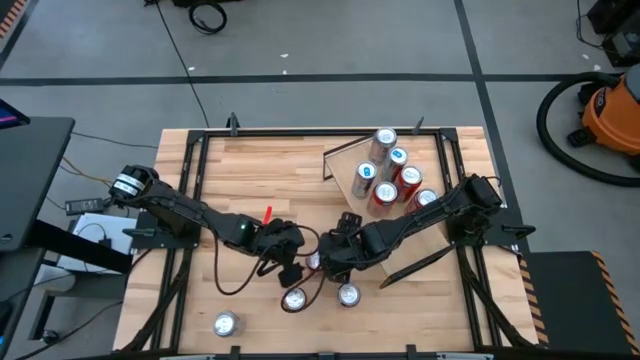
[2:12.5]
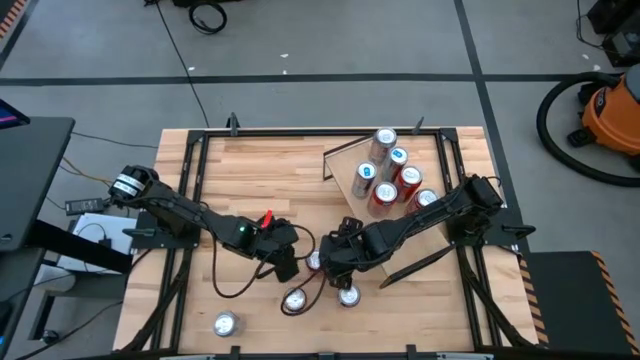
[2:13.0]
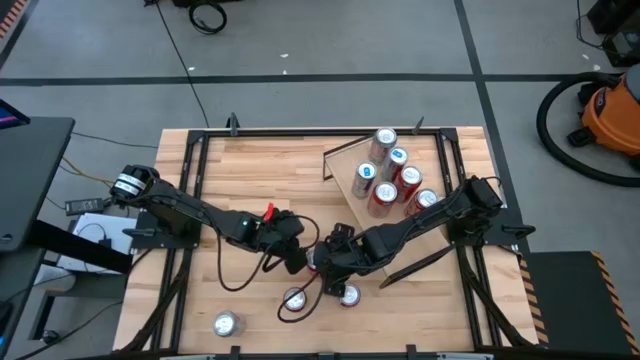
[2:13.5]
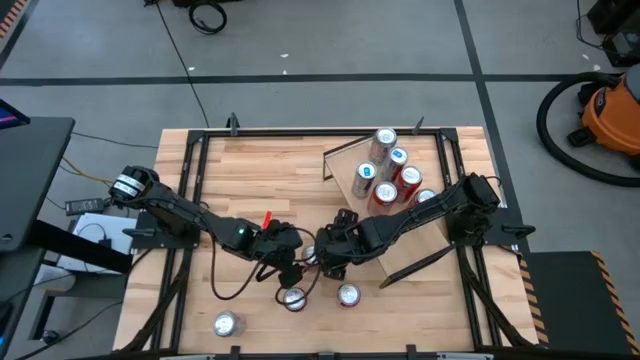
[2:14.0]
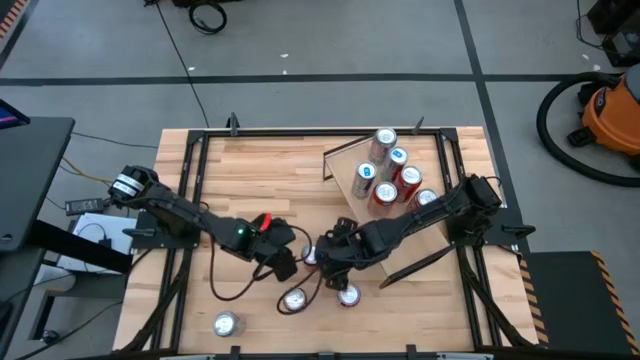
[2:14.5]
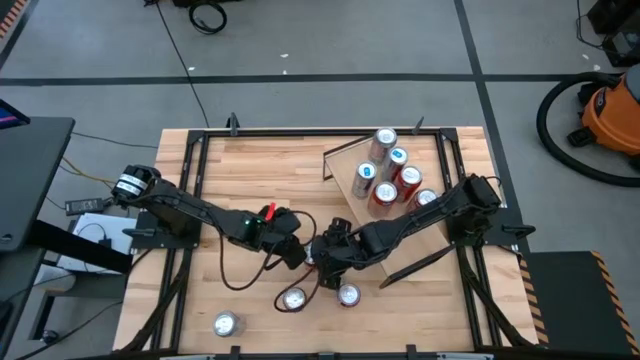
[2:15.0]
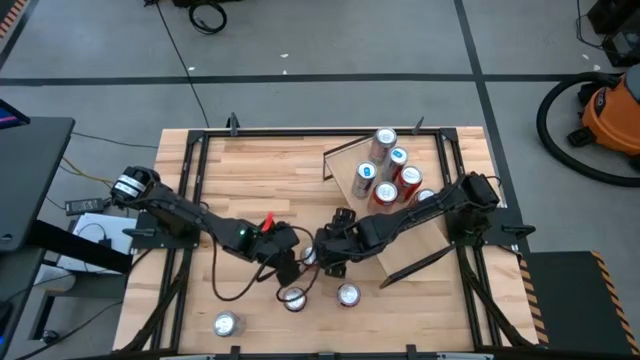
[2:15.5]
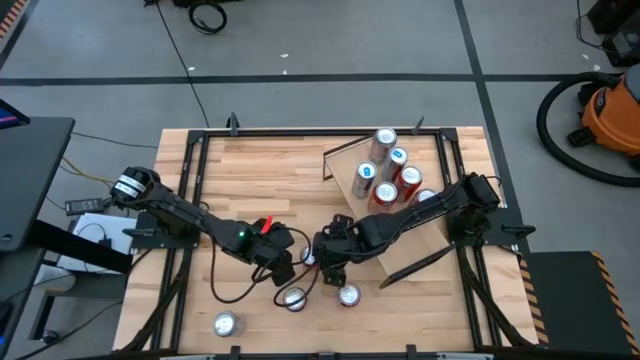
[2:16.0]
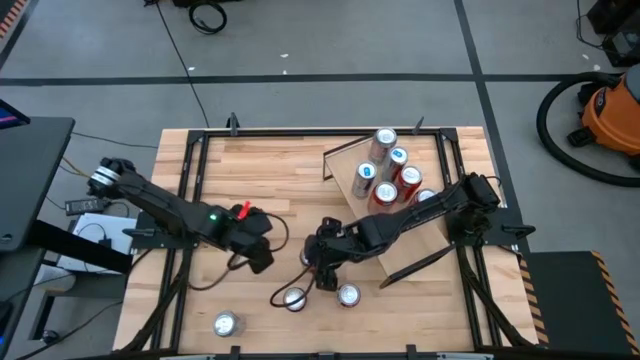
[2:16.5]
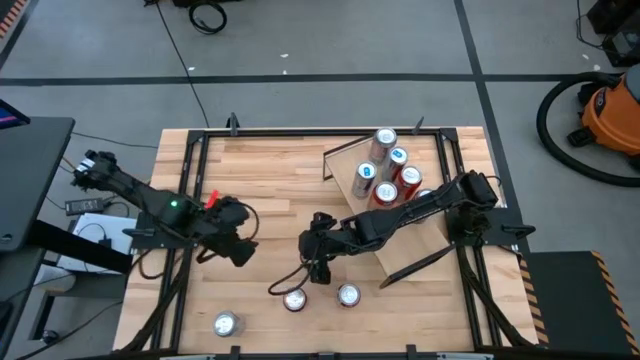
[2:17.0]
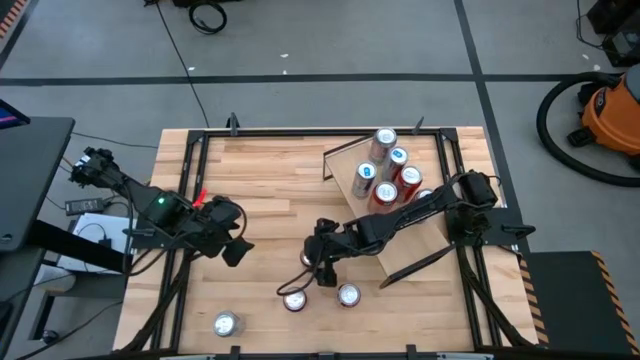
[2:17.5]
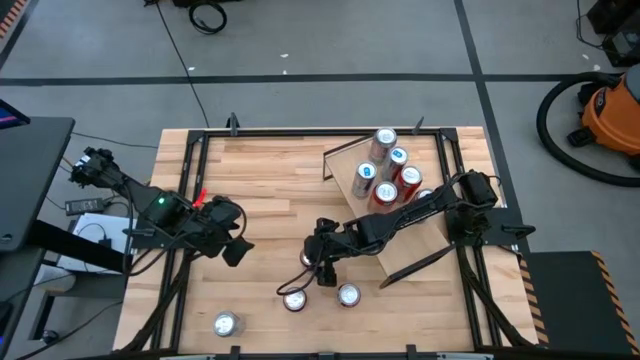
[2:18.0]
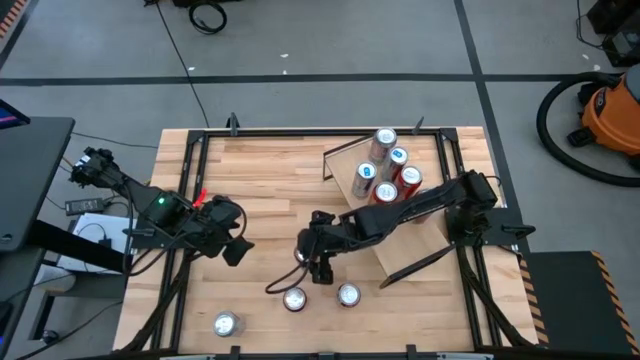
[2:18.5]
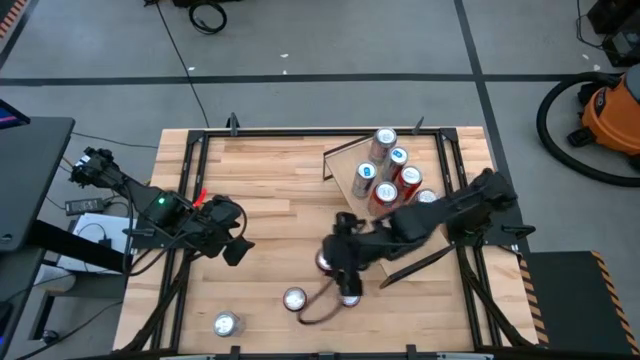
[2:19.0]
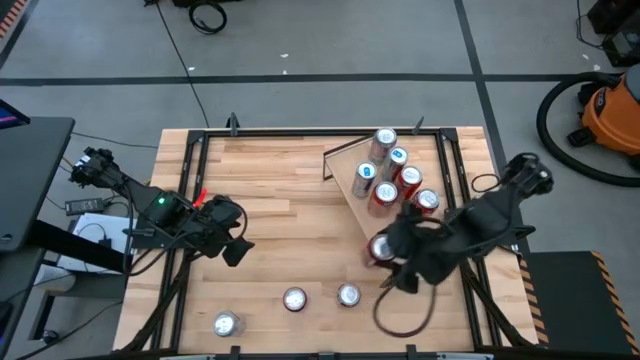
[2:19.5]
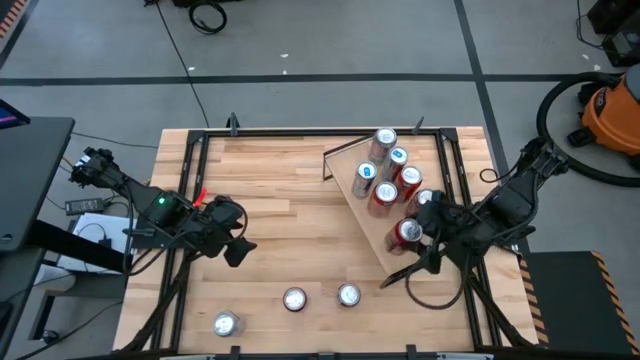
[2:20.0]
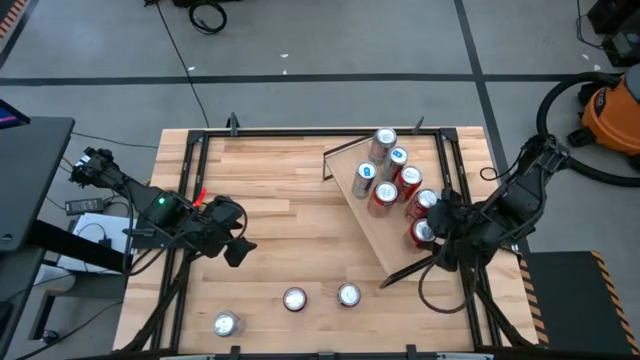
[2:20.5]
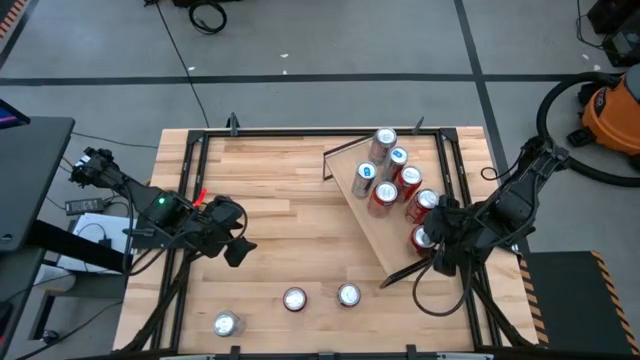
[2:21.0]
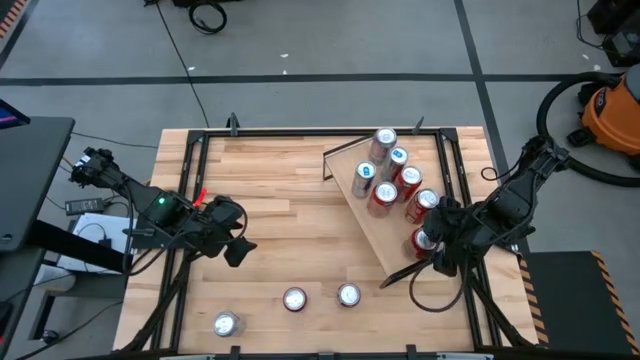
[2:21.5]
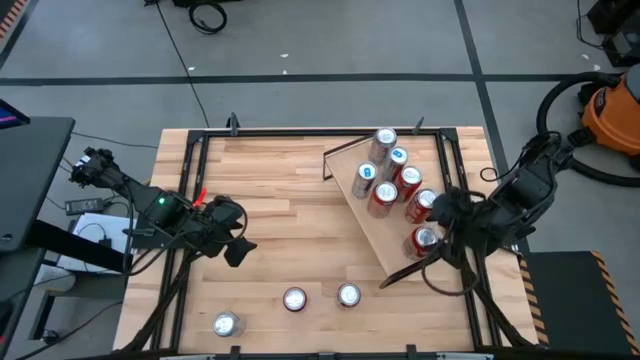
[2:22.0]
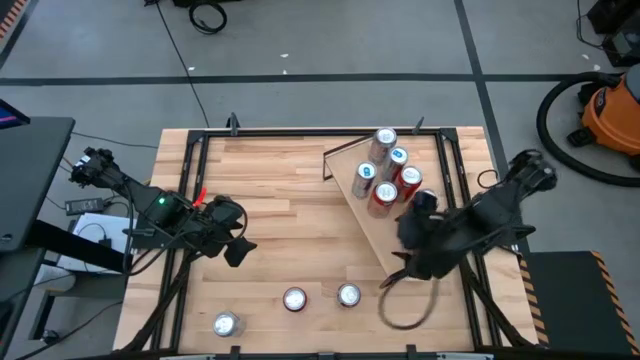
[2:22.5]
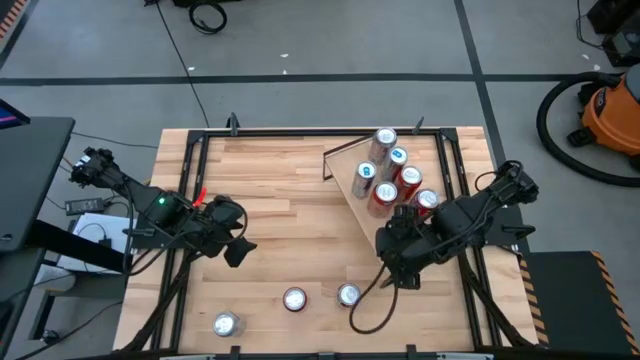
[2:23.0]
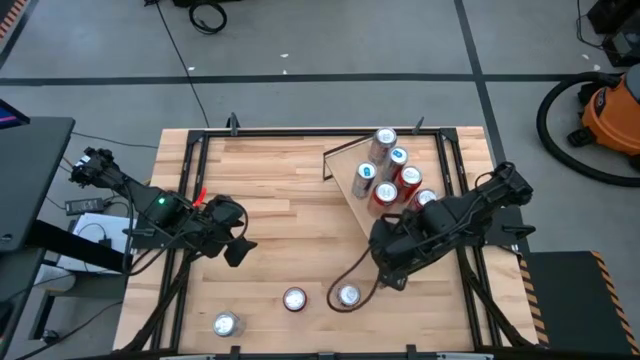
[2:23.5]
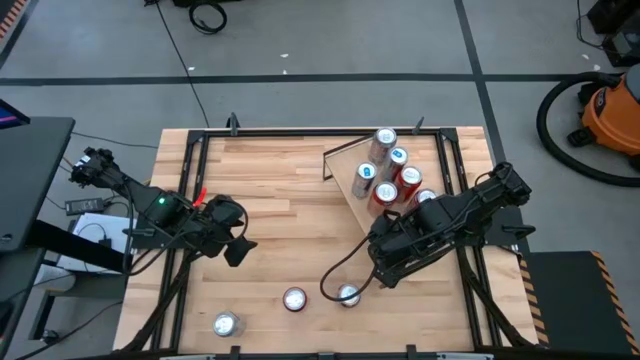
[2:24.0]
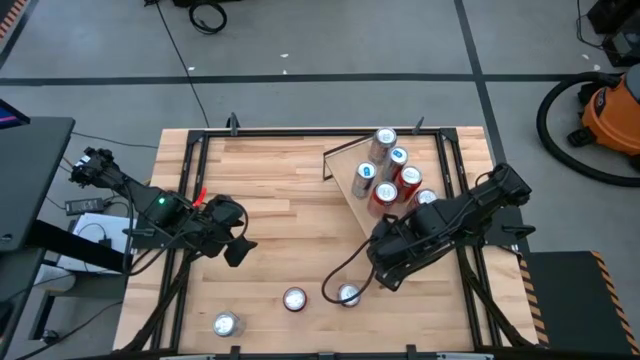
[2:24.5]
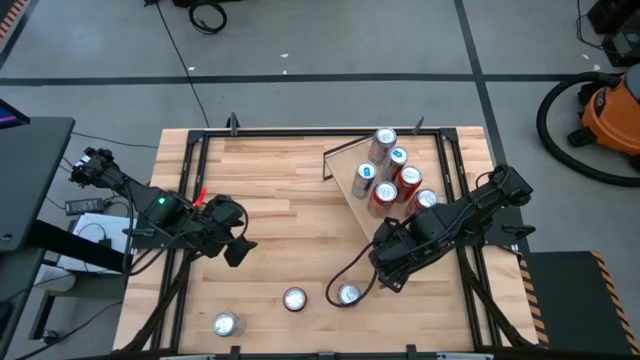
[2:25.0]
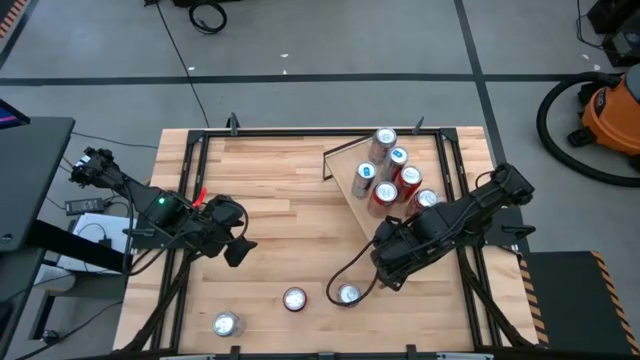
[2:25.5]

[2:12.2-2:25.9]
Task: Place canned beverage on shelf
Put the top left red soda can on the shelf

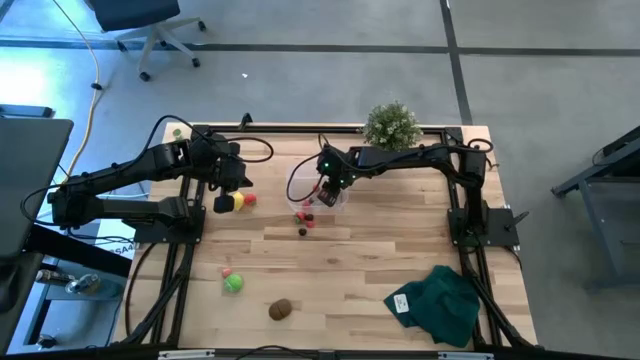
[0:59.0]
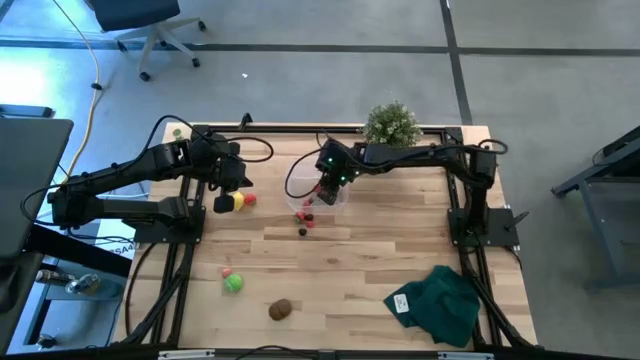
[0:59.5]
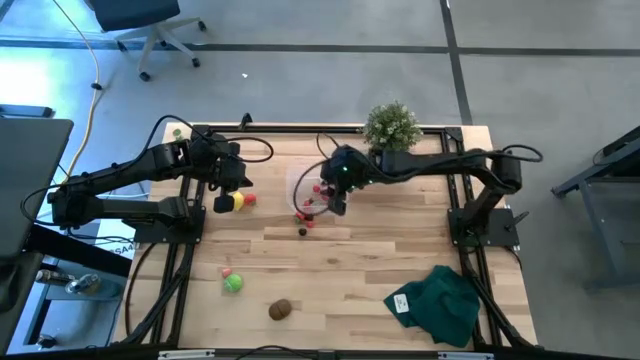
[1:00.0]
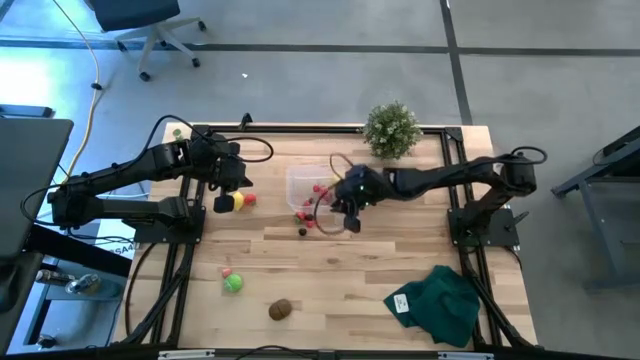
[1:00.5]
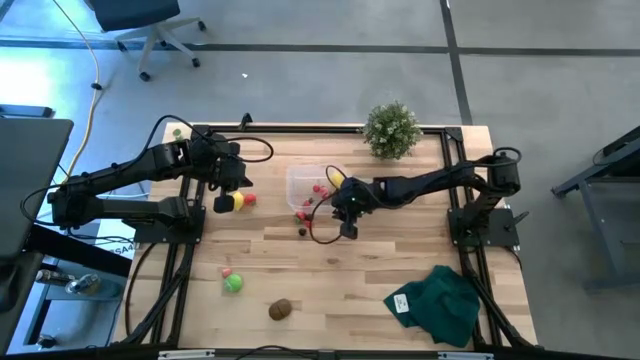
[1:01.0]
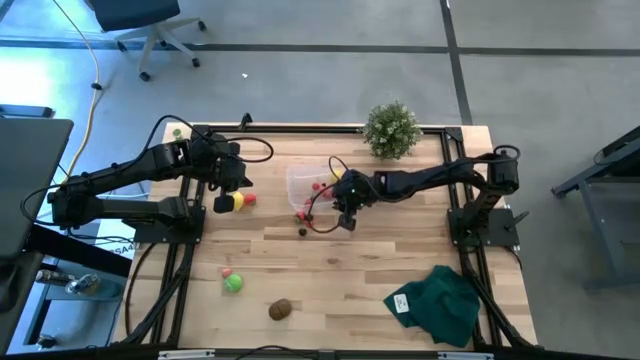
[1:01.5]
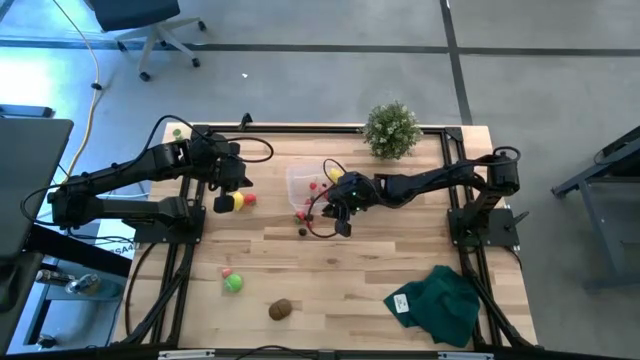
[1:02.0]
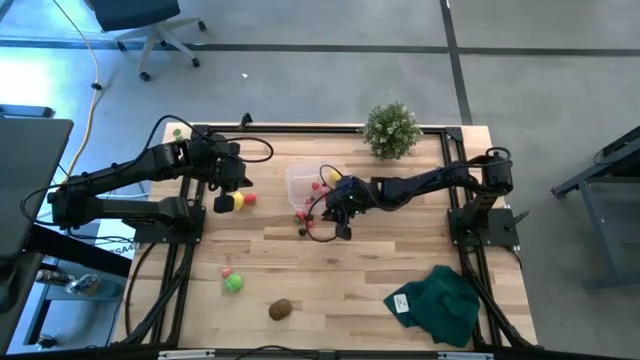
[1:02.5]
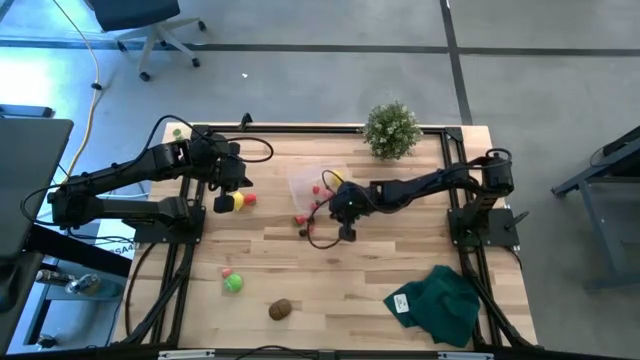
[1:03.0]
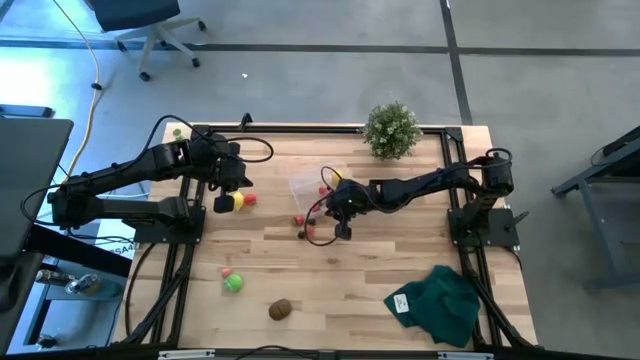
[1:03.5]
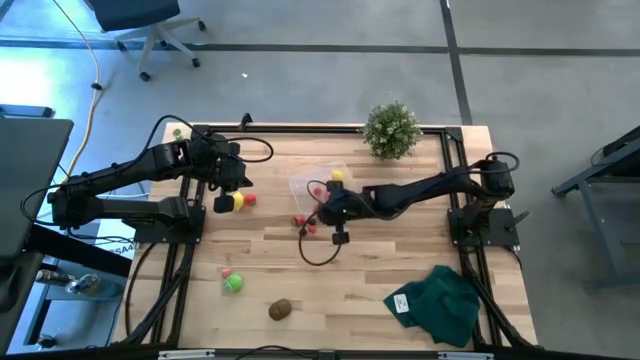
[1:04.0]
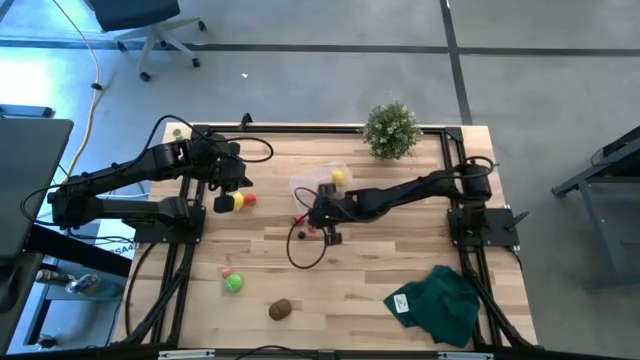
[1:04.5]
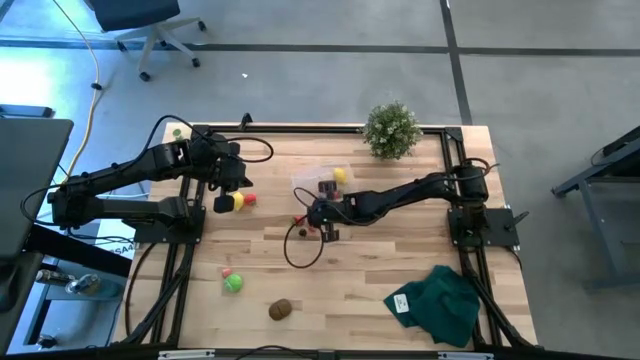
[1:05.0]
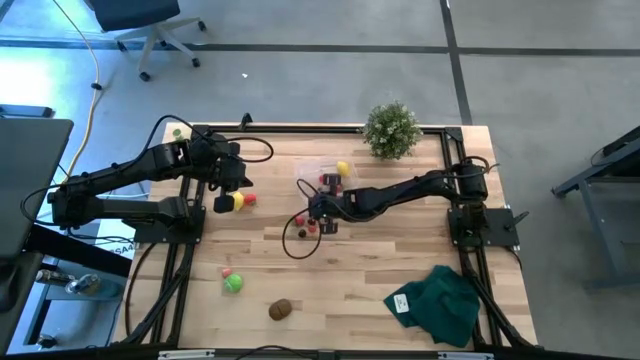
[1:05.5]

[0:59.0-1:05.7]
Task: Pick and placing Produce into tupperware
Adjust the transparent bin on the table
